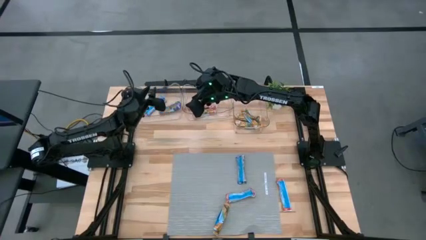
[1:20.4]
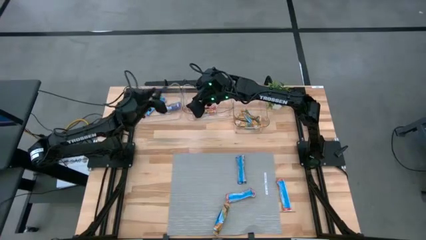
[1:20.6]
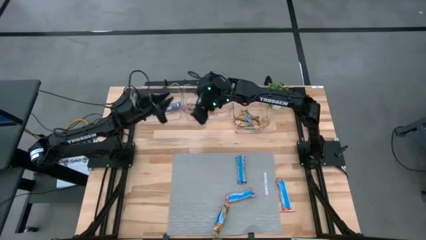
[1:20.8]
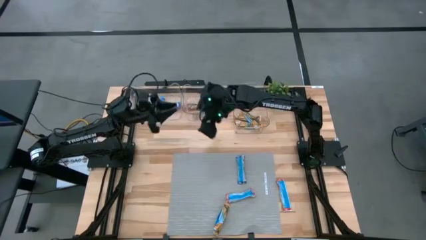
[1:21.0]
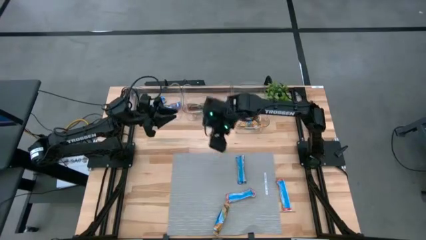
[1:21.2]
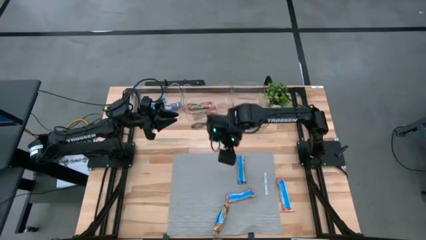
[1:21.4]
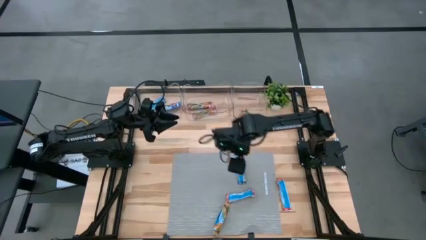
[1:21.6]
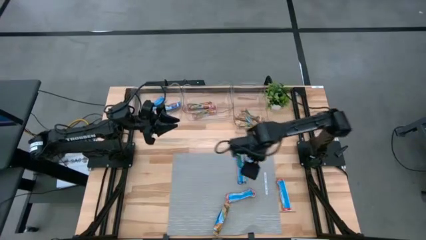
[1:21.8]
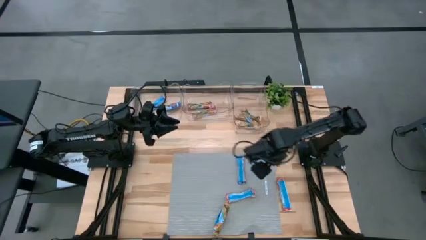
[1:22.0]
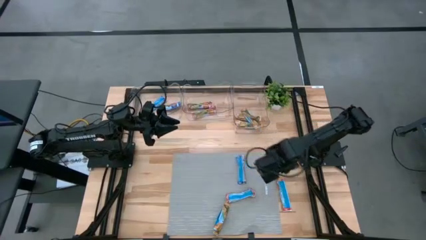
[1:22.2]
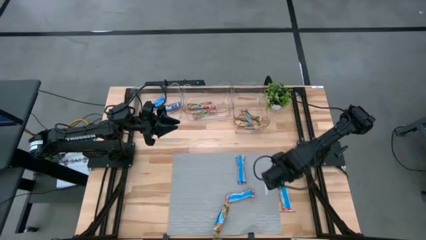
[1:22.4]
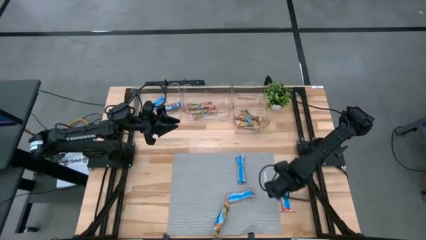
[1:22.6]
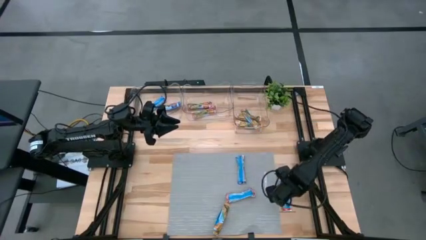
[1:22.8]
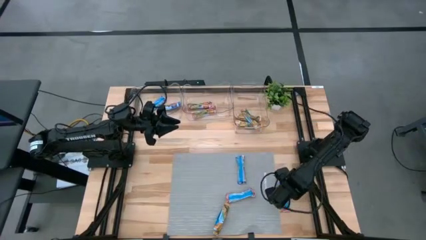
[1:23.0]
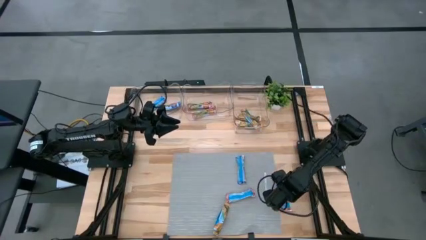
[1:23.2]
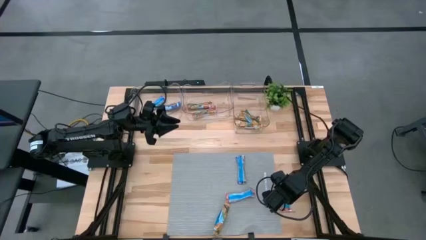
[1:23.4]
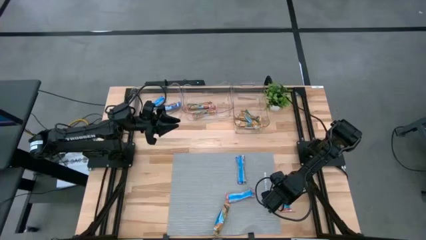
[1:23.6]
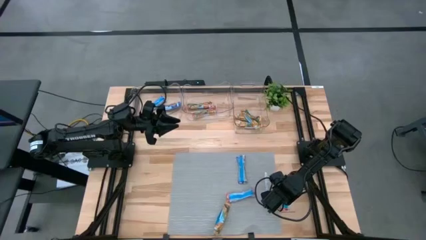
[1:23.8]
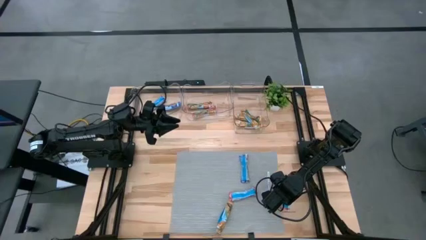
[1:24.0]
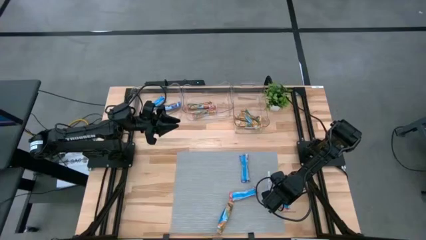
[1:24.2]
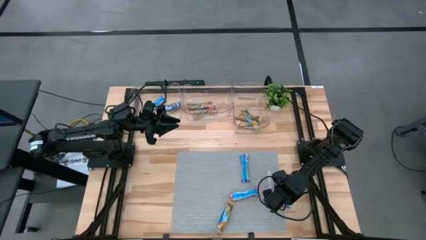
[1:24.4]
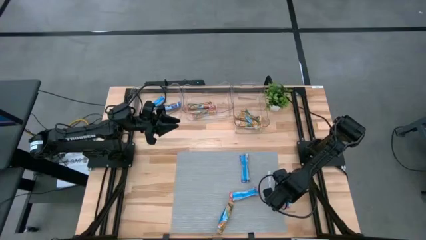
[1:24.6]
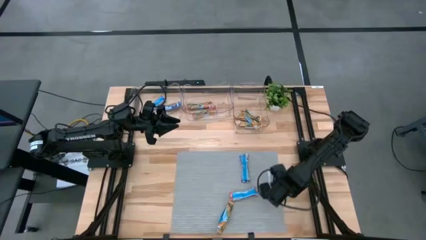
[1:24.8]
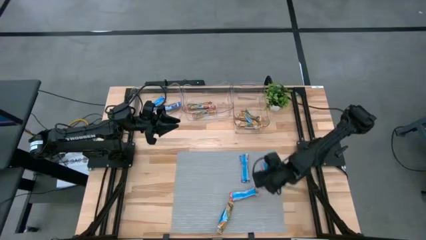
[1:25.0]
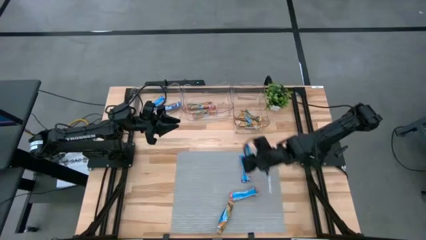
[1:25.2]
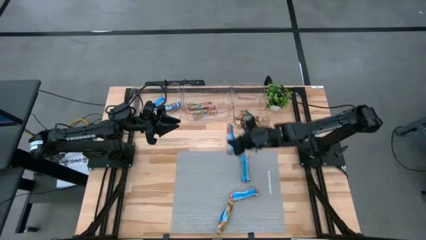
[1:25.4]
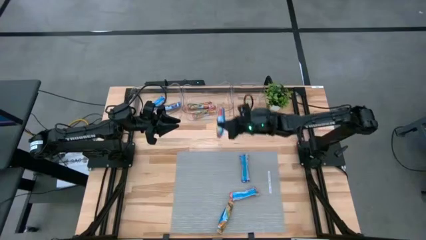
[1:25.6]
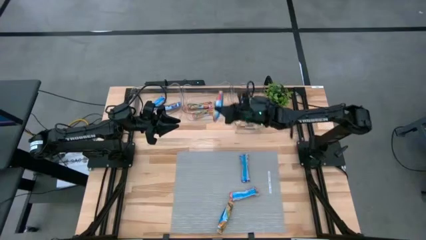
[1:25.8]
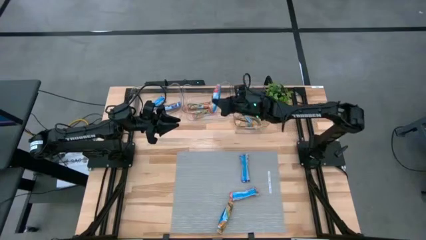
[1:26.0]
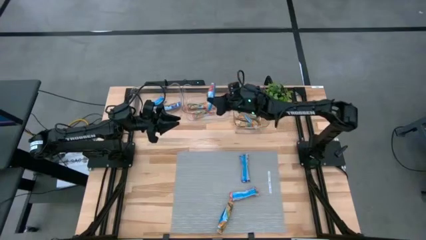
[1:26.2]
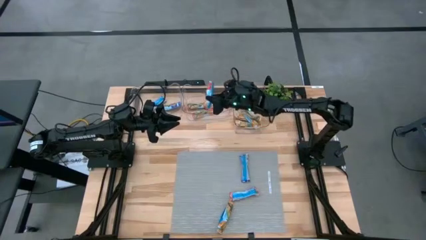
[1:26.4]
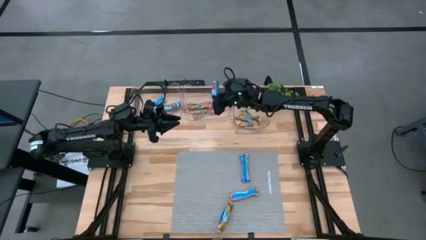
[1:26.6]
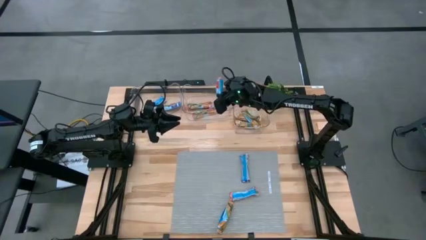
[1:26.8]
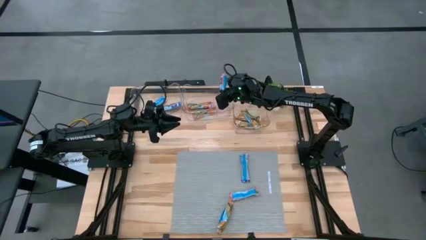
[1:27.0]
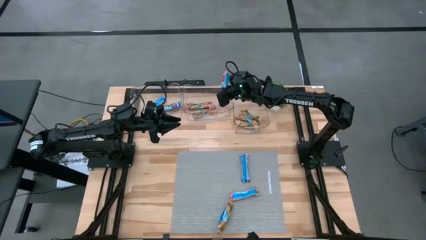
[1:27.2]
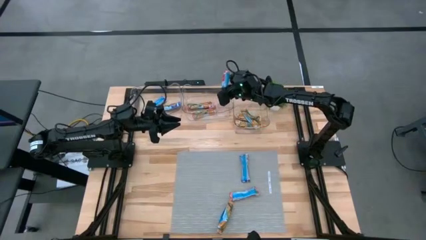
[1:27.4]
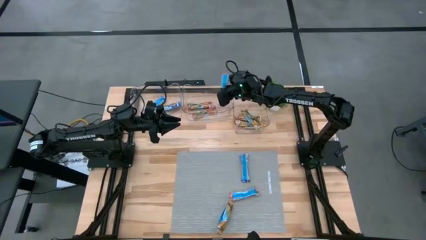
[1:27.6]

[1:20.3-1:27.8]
Task: Pick and place Granola Bars by type
Put the red granola bar into the middle transparent bin

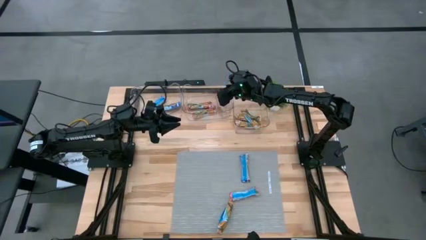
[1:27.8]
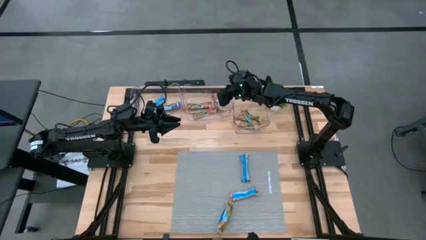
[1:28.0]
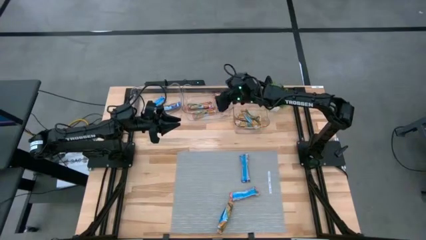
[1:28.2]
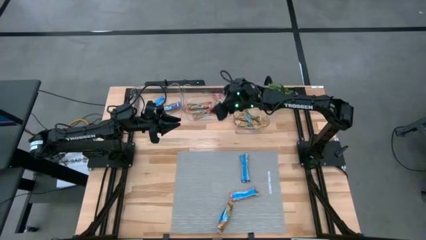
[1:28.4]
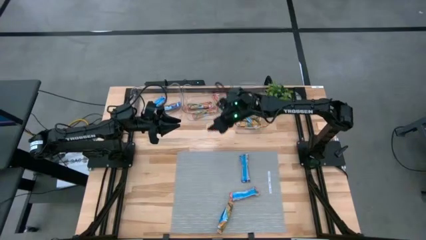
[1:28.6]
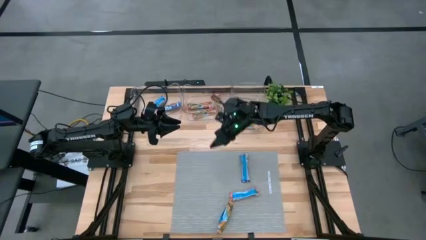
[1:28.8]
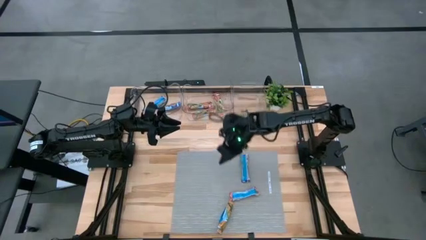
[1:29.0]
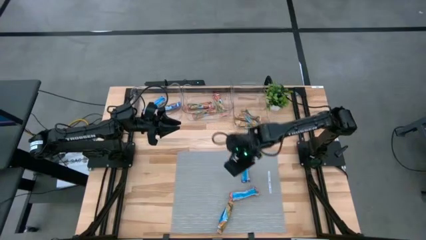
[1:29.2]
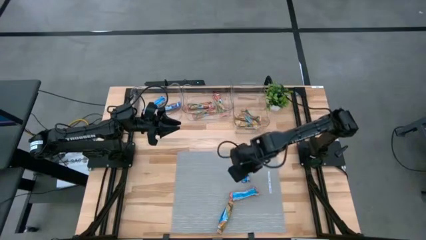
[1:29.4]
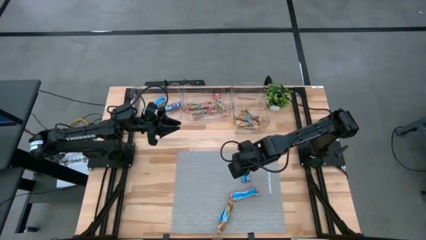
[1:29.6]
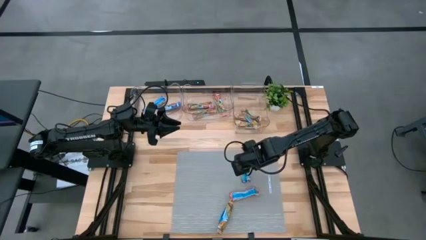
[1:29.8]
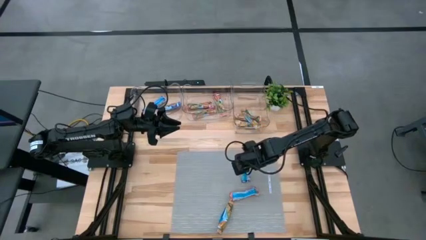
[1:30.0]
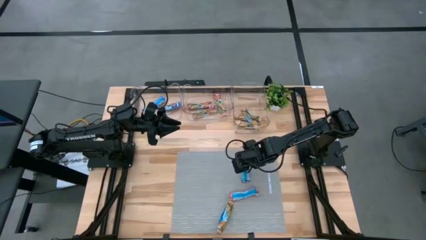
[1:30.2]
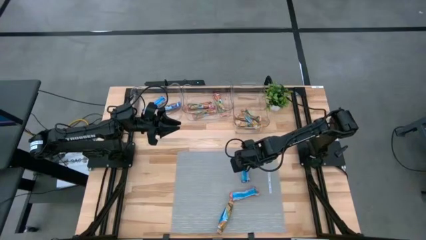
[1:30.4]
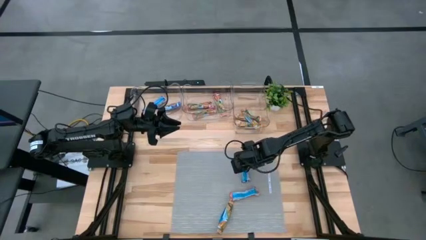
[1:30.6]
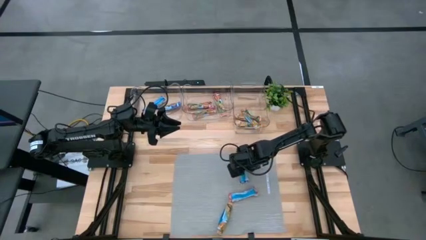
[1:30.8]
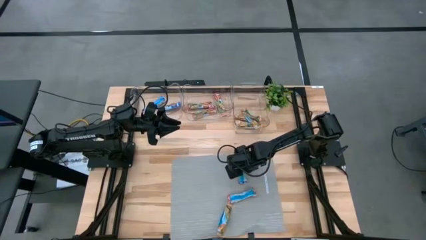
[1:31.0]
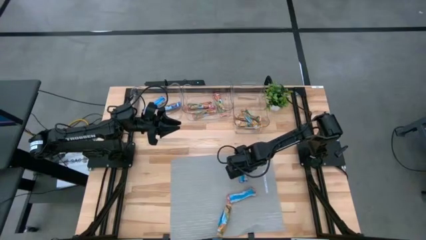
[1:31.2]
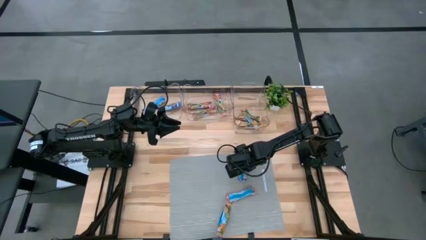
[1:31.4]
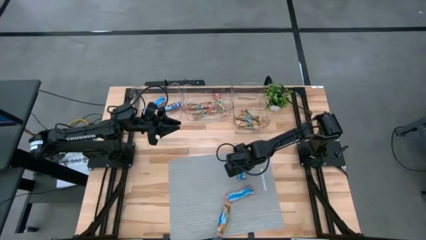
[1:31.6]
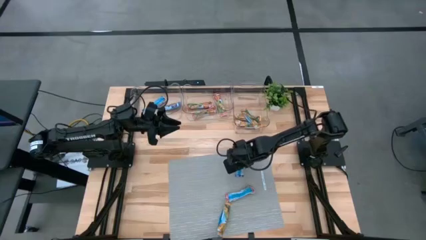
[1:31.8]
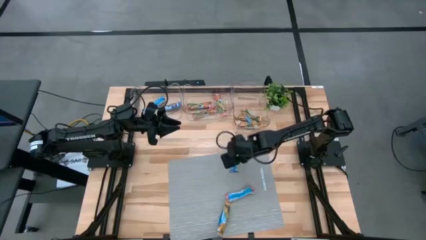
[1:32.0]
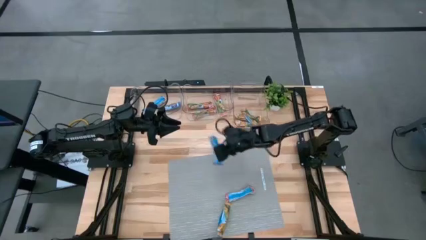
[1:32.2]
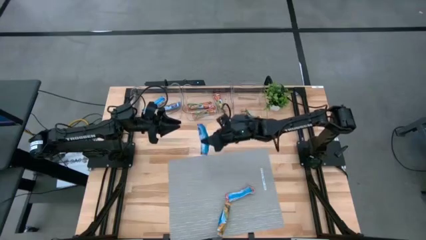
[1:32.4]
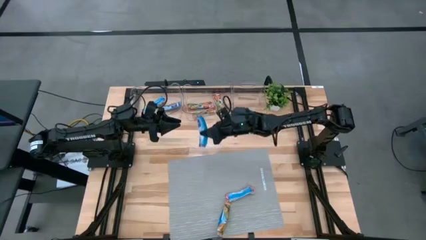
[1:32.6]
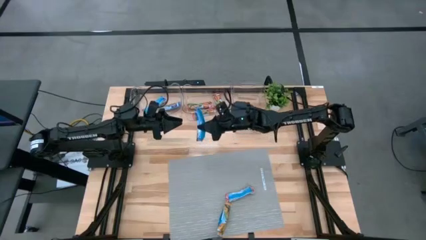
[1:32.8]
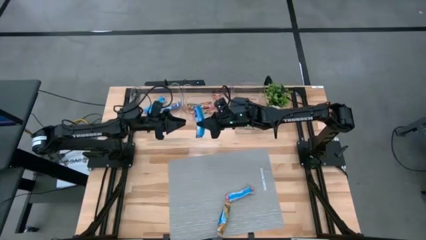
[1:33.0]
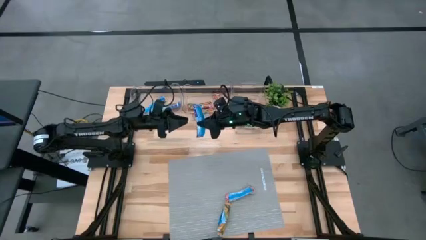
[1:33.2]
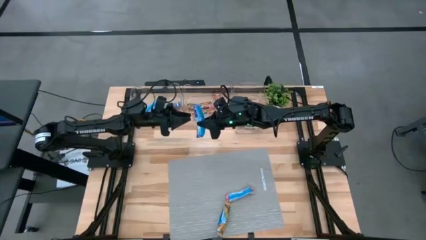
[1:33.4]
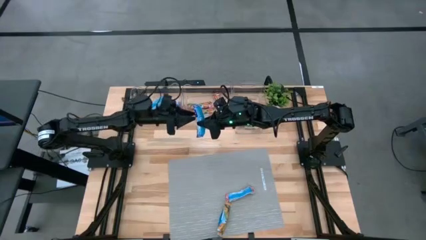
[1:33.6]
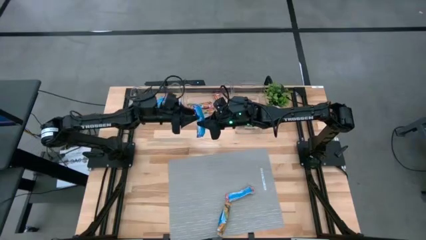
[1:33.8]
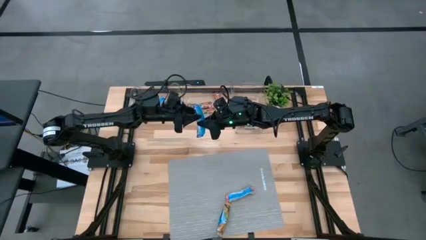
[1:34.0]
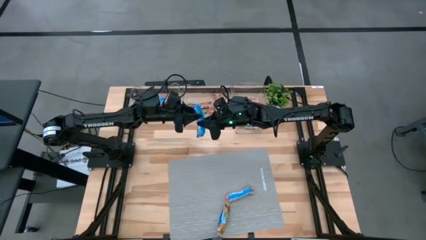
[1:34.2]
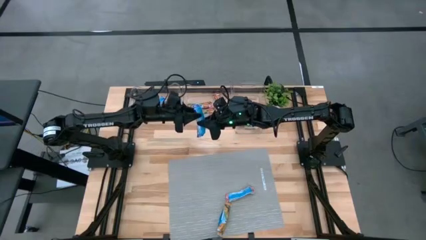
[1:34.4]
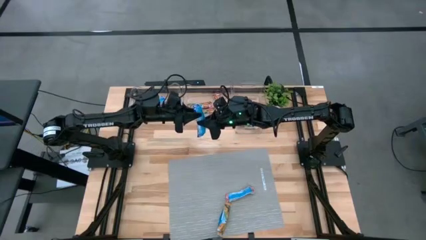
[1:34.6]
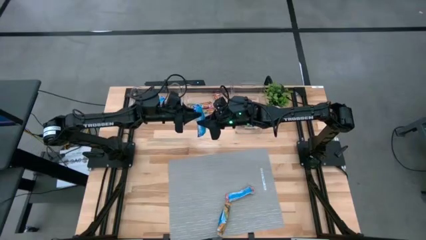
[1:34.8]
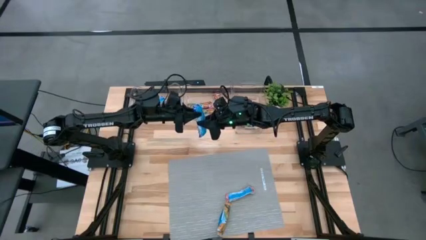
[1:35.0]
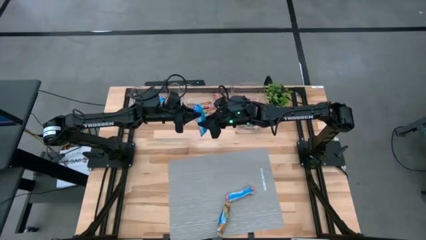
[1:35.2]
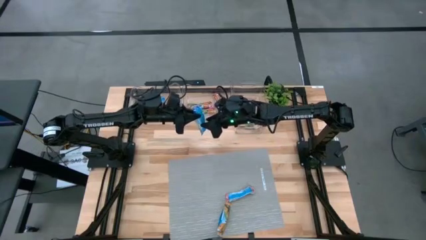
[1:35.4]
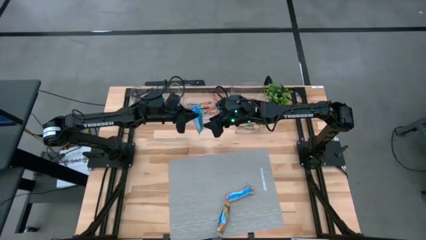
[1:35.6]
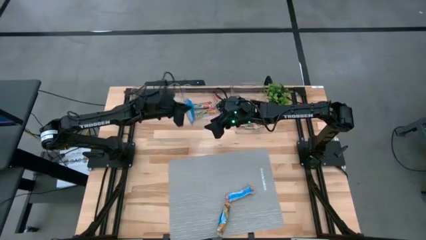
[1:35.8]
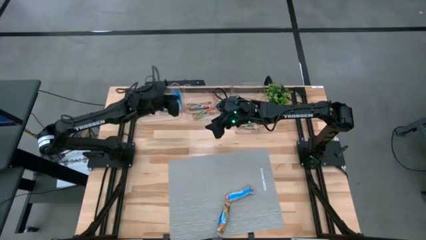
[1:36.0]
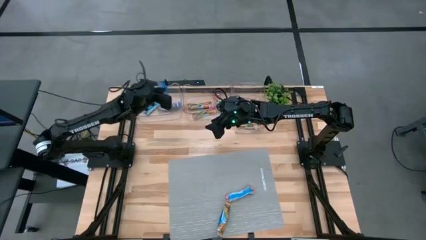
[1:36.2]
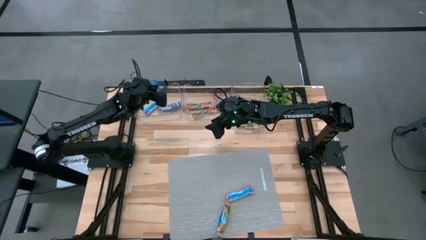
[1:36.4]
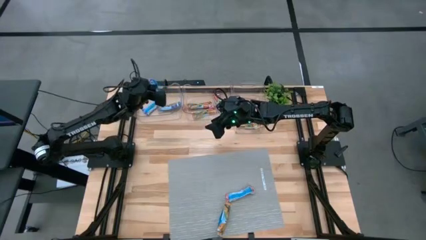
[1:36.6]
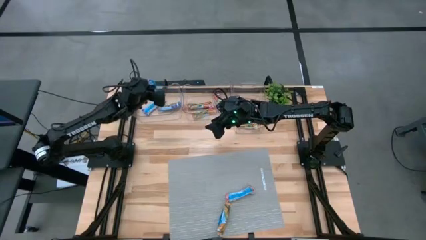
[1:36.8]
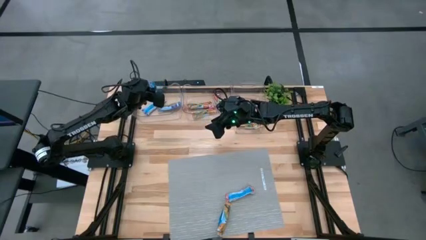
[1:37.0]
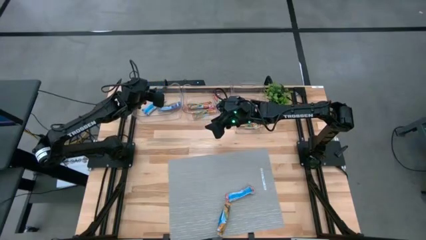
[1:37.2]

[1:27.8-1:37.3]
Put the blue granola bar into the left transparent bin
